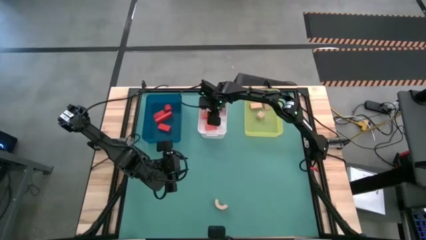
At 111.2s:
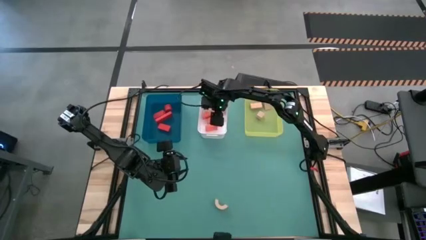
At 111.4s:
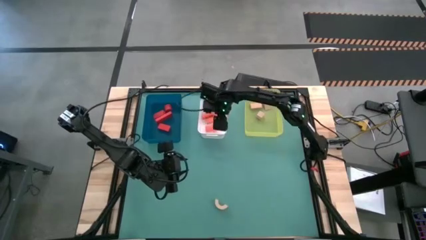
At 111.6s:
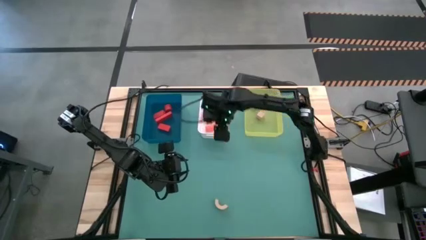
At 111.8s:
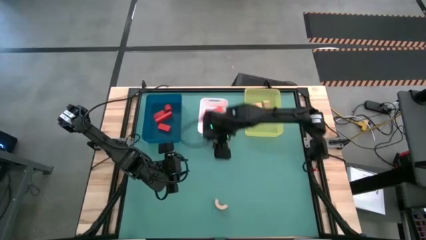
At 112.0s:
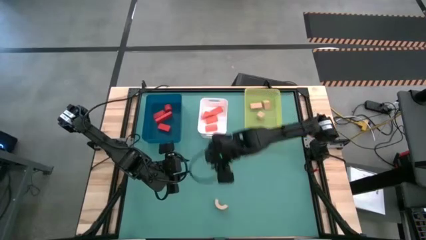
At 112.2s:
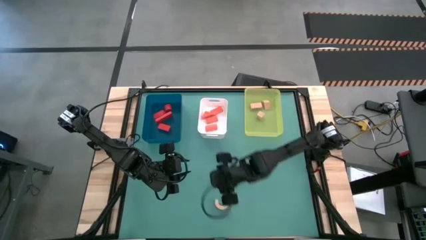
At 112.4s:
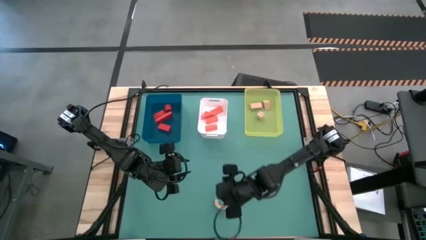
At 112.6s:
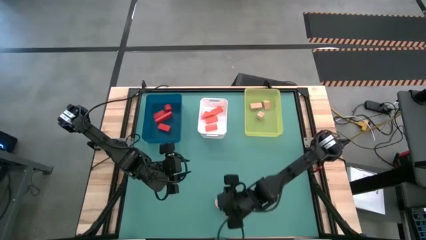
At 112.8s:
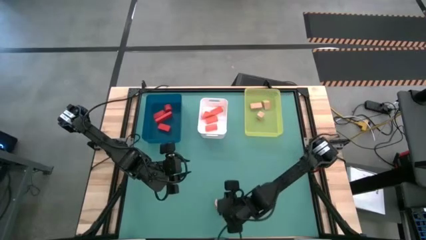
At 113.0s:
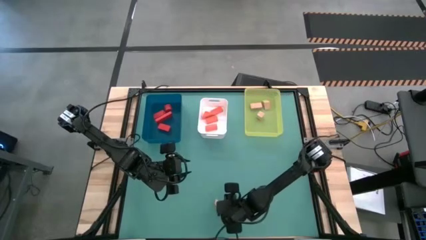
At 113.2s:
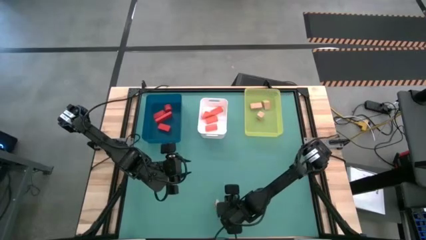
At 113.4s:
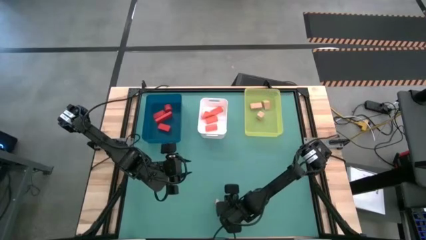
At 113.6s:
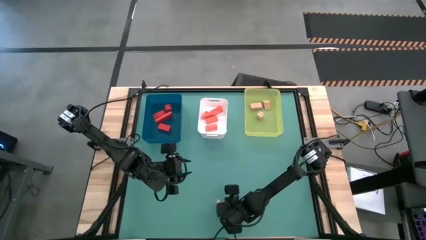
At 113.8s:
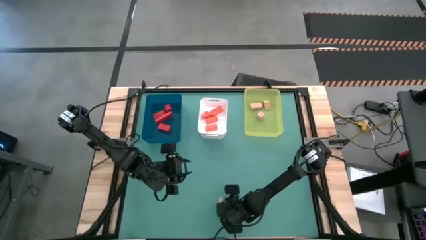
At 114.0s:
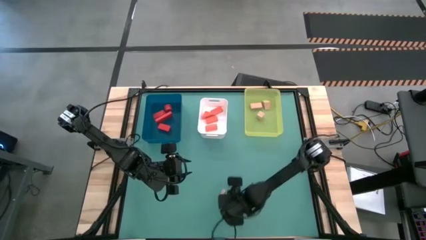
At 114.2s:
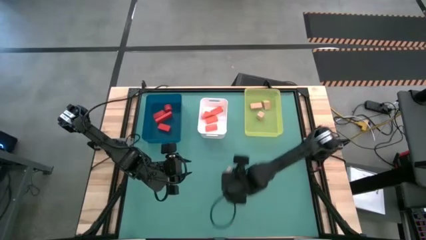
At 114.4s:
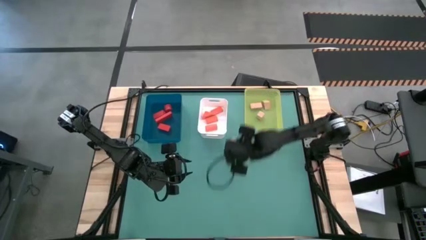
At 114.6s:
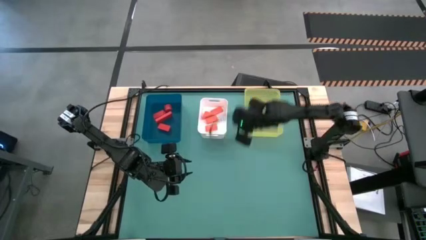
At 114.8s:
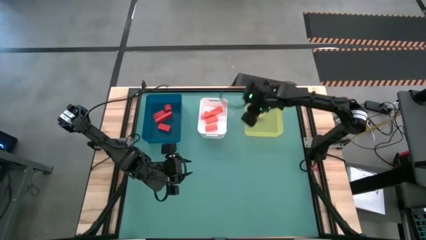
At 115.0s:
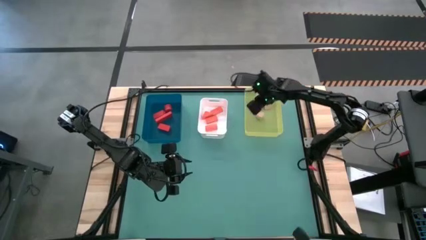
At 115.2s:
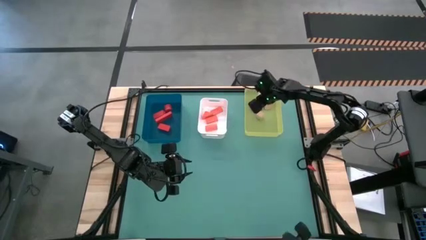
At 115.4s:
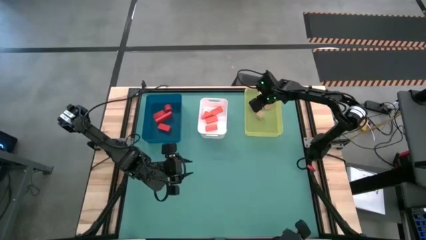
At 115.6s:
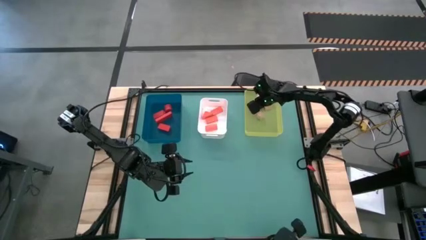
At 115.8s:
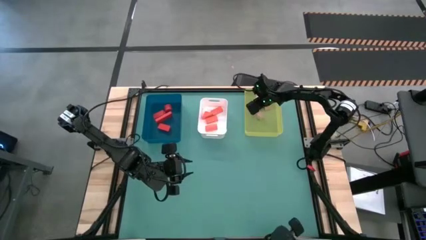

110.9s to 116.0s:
Task: Sort & place blocks by color
Put the light brown block into the yellow bin

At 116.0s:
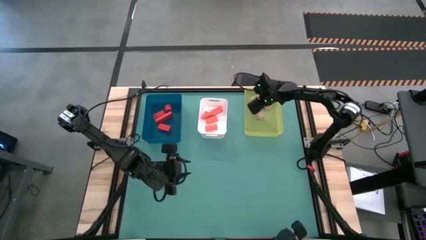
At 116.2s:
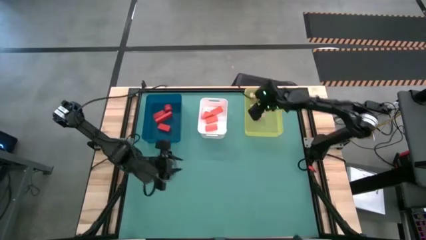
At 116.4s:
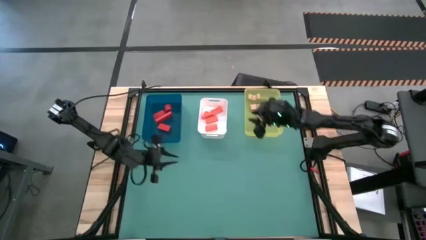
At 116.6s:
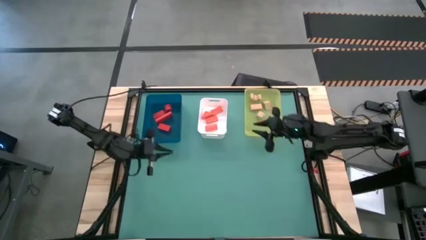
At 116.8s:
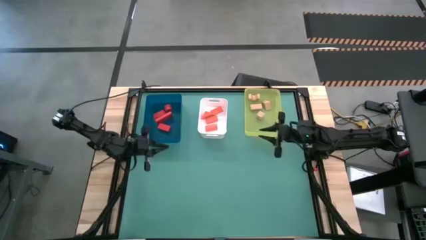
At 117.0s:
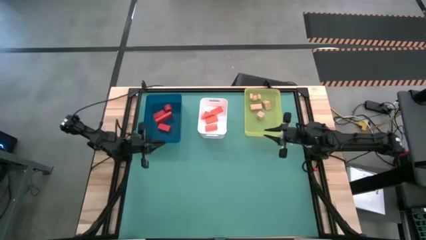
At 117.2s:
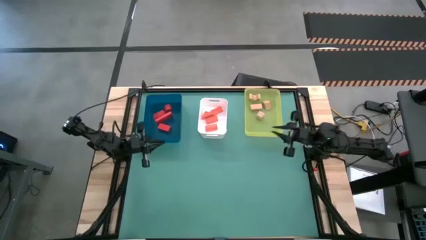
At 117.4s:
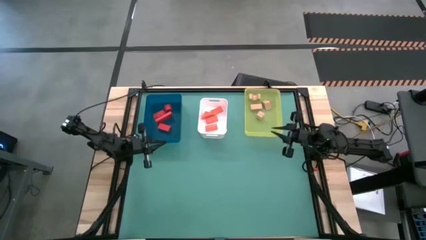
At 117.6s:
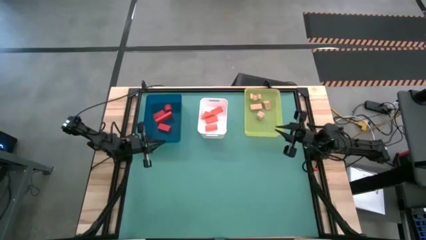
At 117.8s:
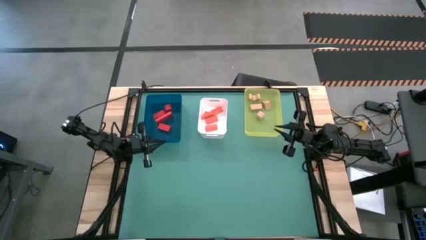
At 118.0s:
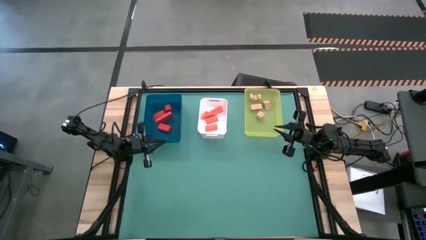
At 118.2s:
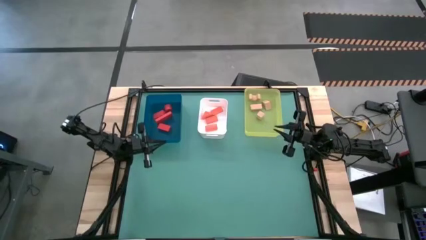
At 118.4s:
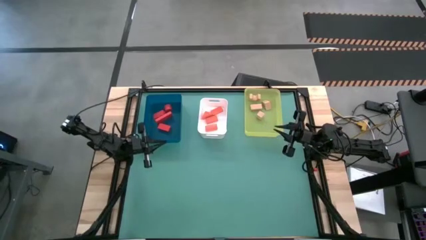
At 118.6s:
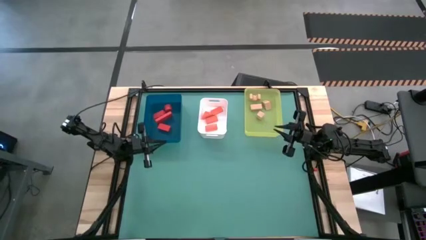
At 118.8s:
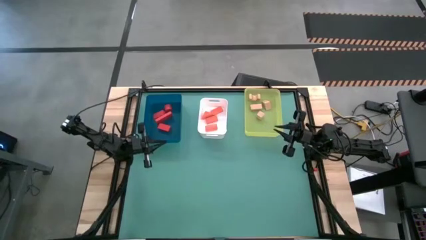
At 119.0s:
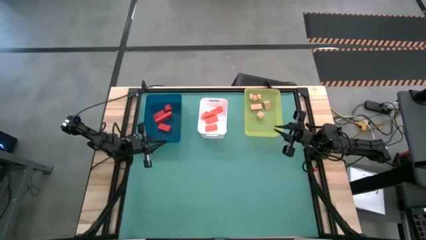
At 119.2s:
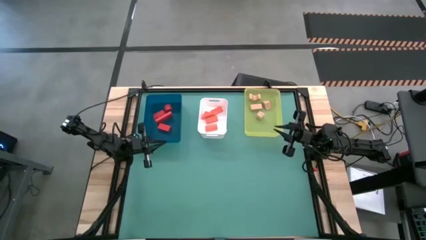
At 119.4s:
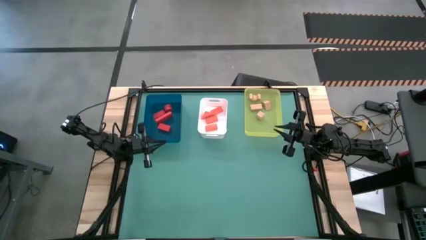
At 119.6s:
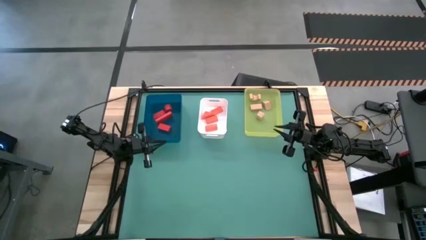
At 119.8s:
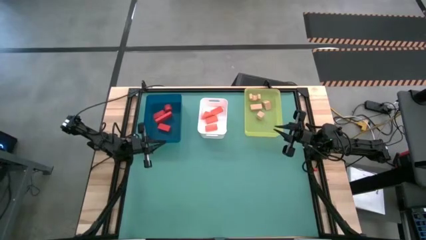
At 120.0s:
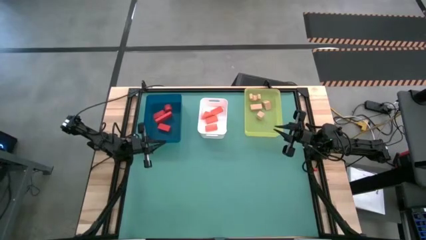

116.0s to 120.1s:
Return to Home Position

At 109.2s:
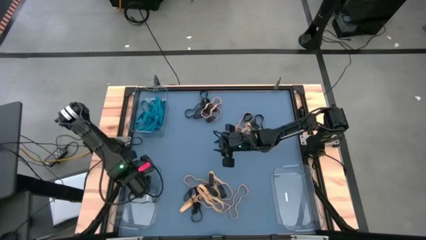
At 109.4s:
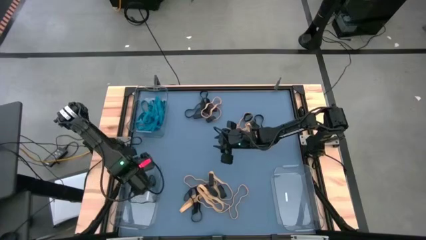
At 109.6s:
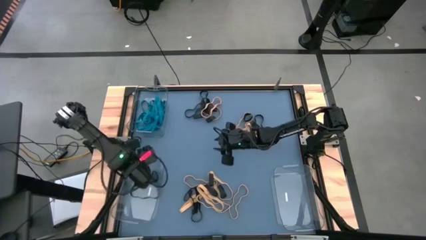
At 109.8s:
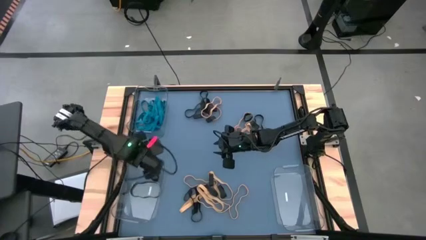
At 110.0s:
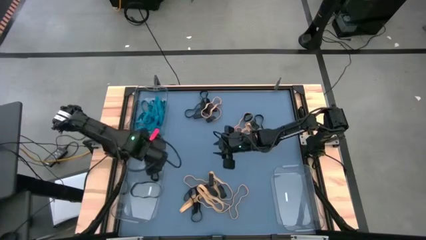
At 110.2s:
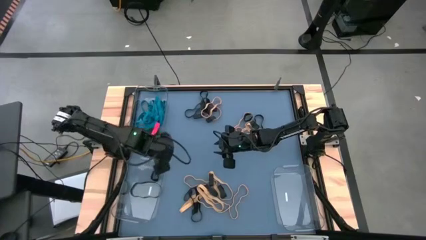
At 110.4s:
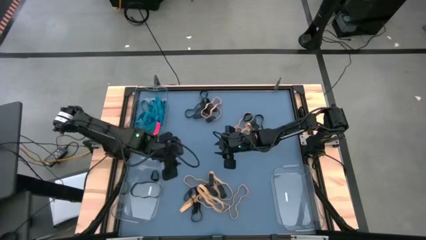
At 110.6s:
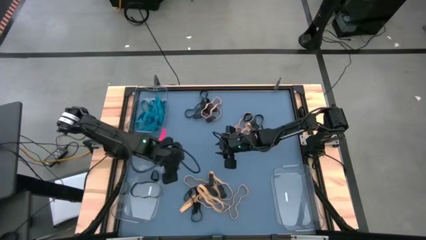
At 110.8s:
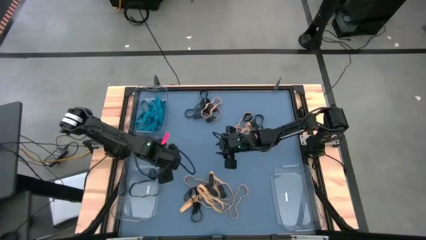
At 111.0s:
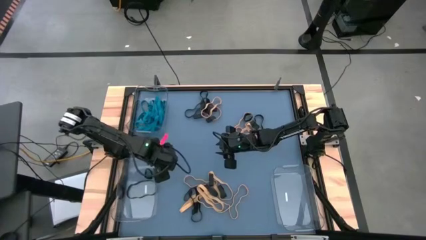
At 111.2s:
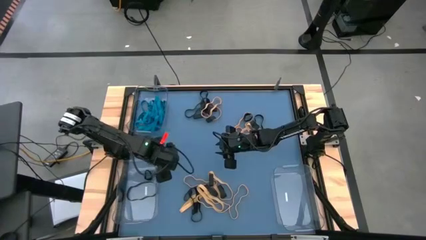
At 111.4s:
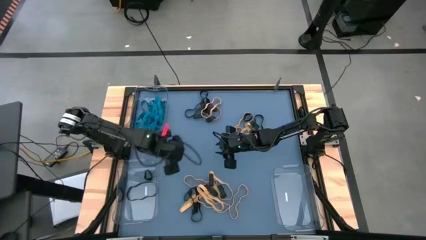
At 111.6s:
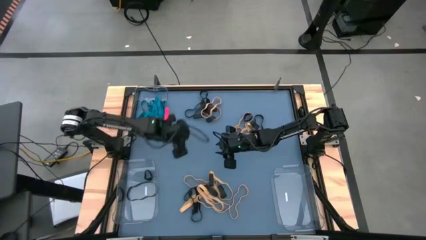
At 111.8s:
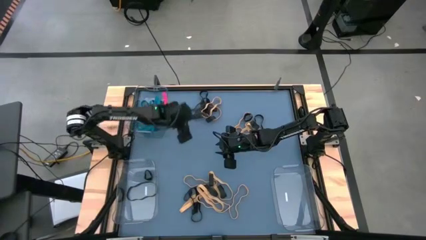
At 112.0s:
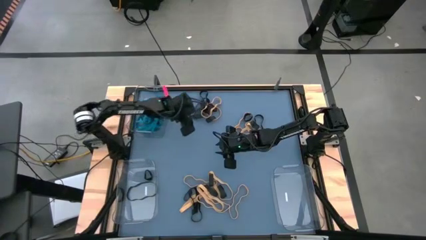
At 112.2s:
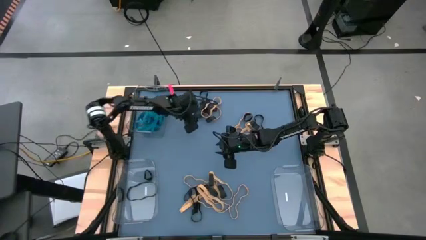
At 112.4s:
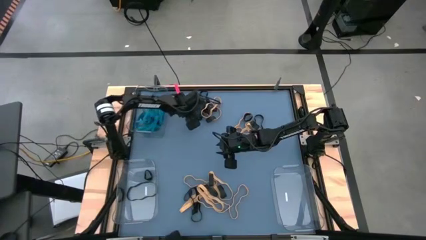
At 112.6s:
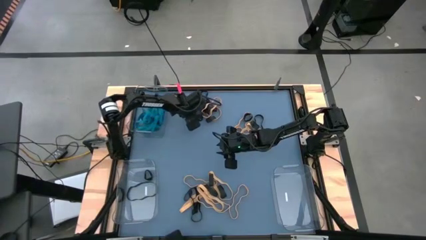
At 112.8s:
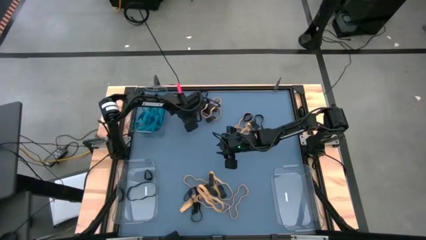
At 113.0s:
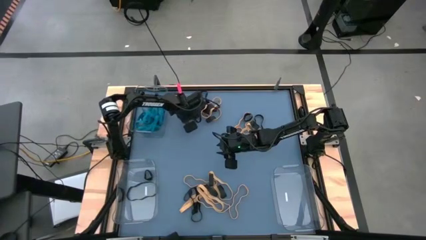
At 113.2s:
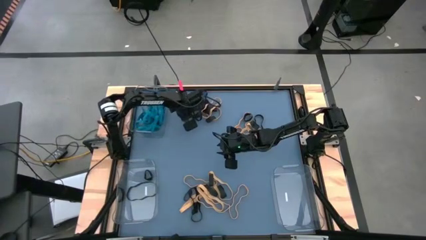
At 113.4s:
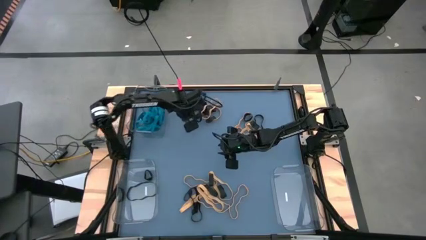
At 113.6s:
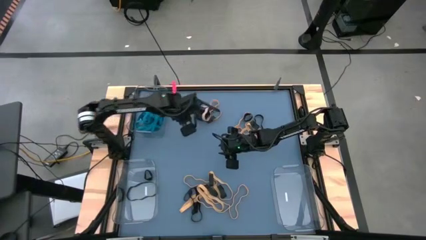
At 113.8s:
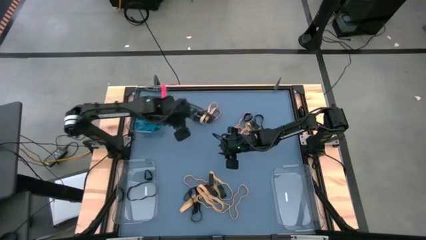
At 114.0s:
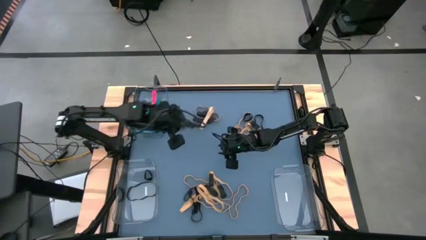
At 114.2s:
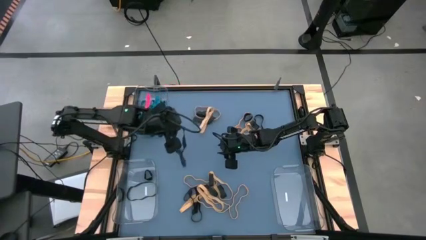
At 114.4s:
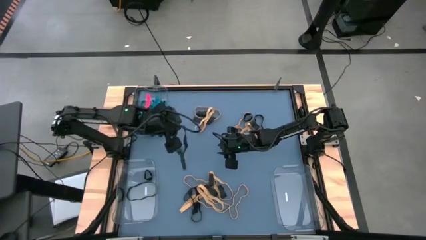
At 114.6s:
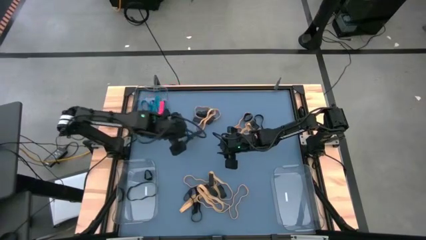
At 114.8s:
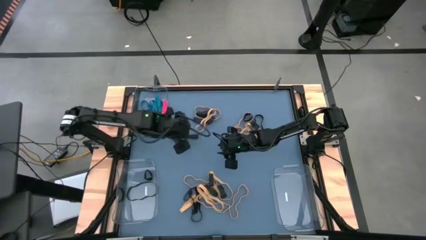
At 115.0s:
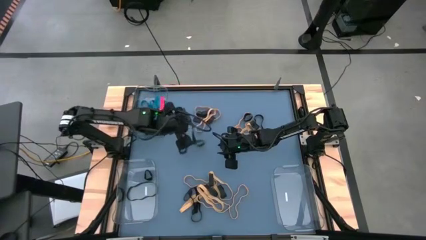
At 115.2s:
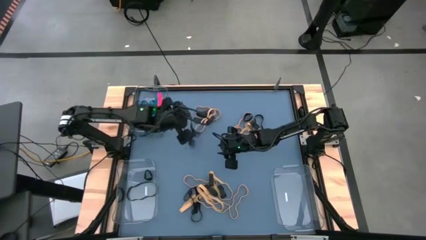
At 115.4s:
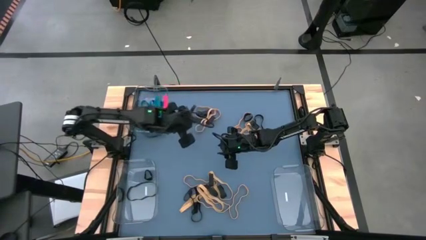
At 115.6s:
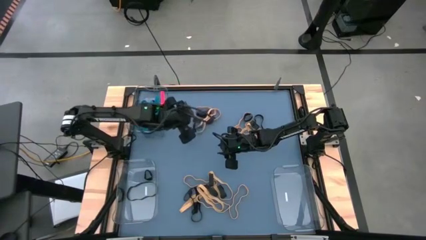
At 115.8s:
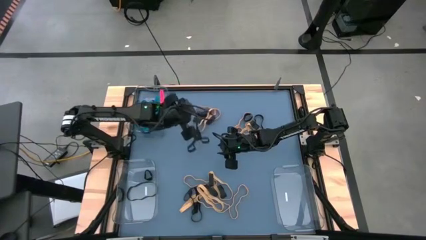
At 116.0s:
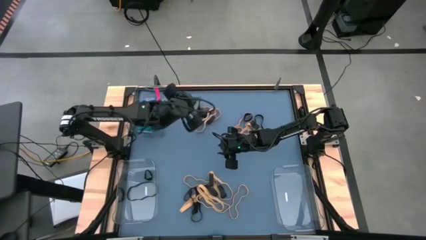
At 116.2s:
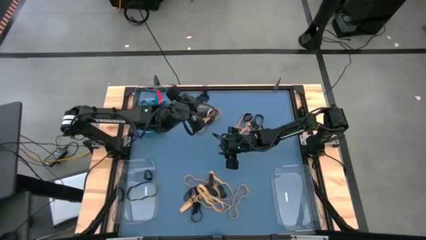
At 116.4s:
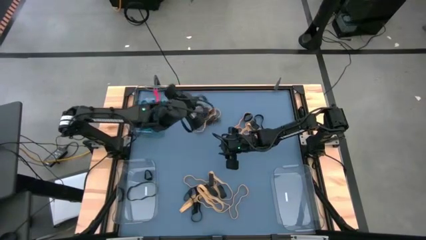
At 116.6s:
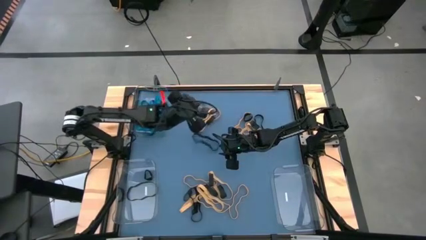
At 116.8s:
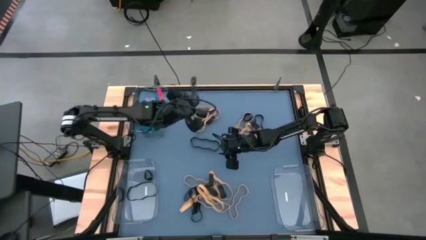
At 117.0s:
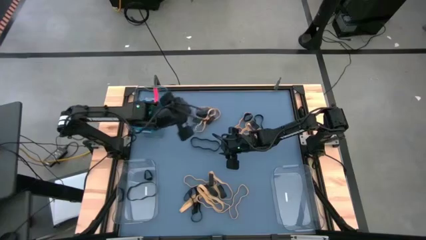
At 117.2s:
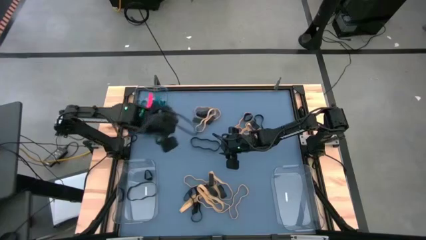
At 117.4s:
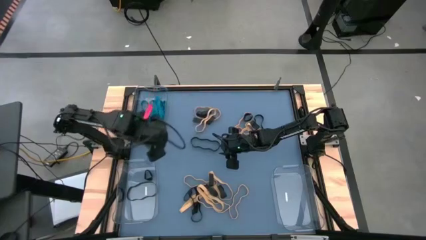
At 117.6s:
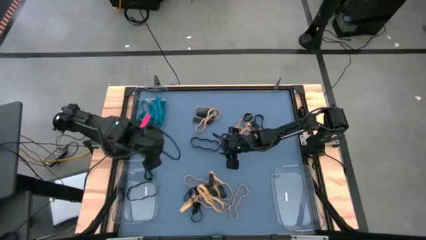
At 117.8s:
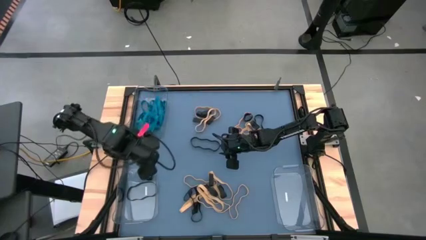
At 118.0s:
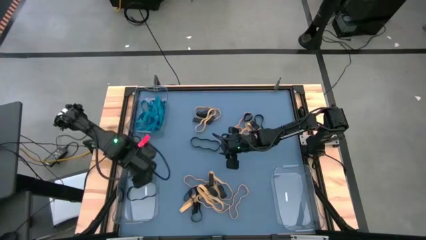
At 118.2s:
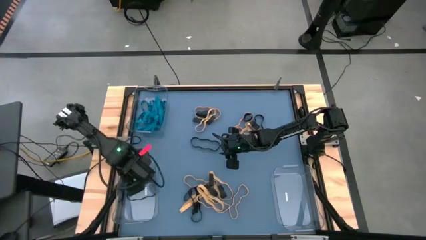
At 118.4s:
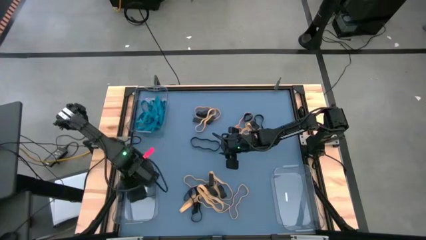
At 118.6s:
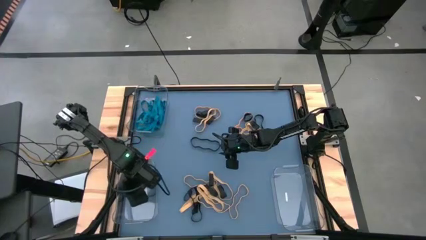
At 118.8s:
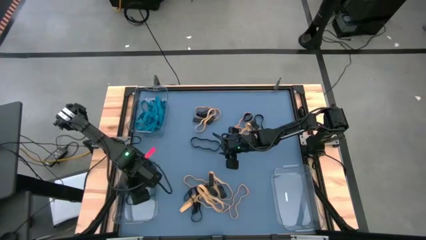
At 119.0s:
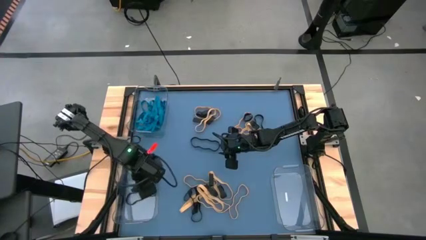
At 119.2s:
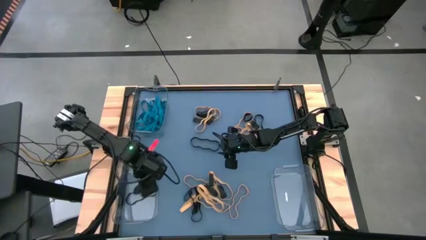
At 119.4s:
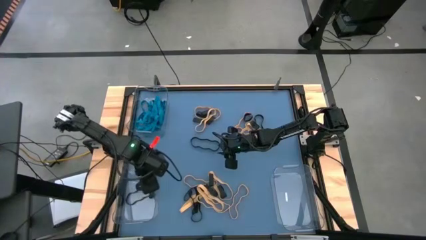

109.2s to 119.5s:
Task: Sort rubber bands into baskets
Put the black rubber band into the bottom left transparent bin
